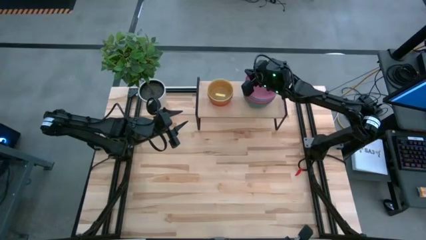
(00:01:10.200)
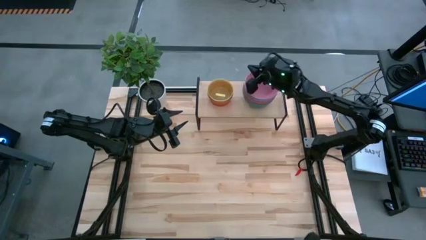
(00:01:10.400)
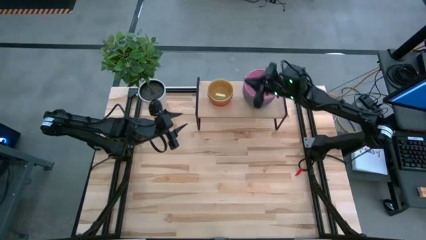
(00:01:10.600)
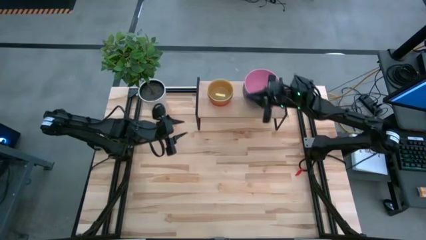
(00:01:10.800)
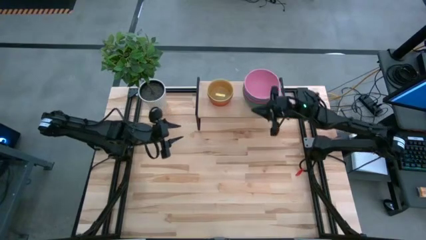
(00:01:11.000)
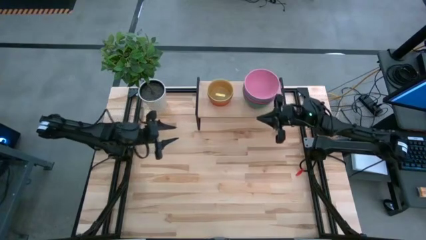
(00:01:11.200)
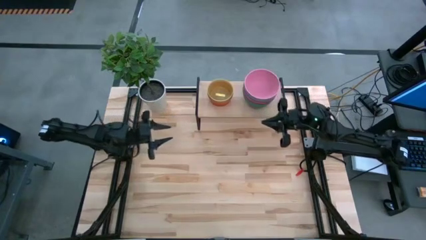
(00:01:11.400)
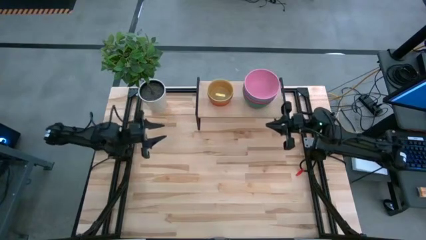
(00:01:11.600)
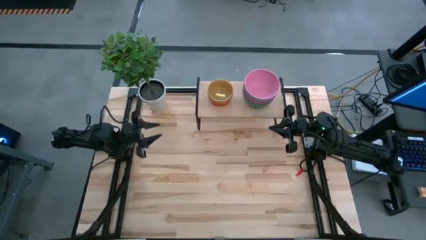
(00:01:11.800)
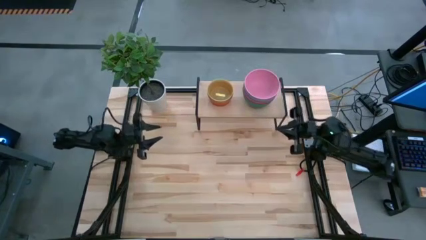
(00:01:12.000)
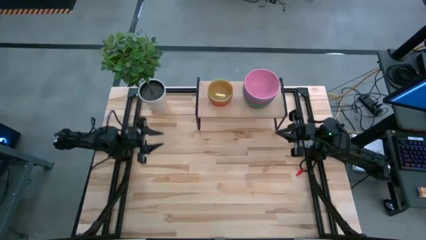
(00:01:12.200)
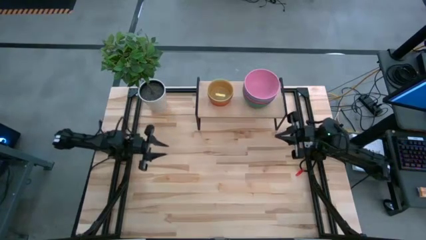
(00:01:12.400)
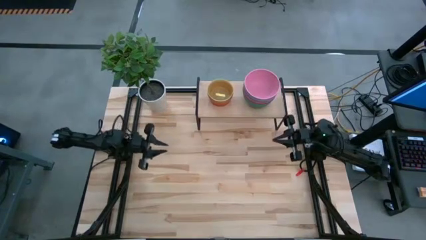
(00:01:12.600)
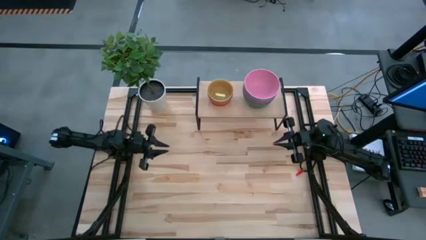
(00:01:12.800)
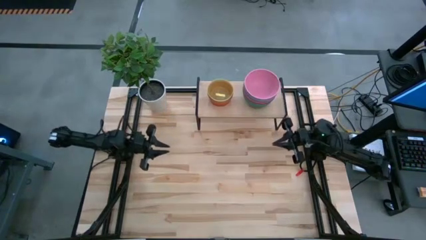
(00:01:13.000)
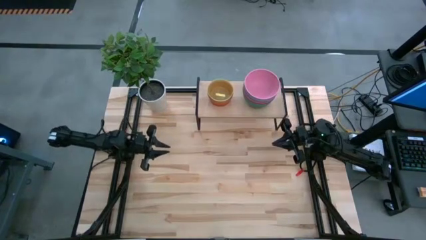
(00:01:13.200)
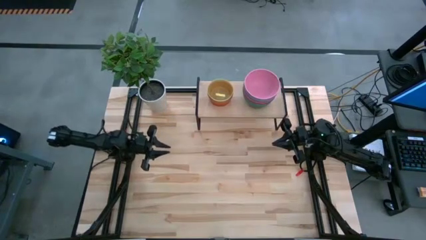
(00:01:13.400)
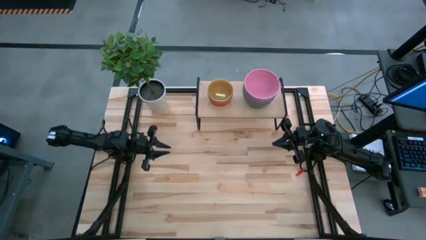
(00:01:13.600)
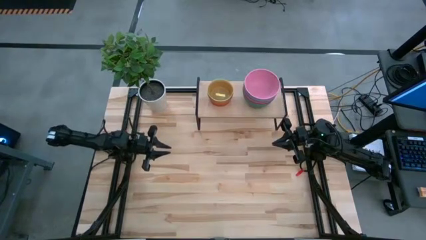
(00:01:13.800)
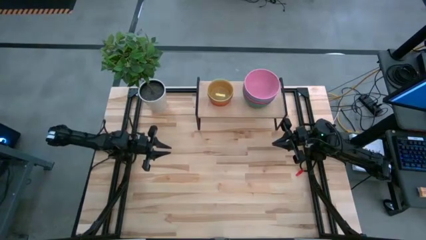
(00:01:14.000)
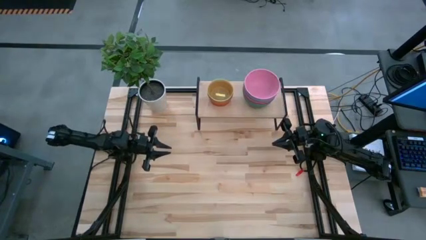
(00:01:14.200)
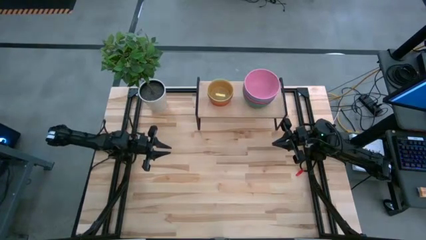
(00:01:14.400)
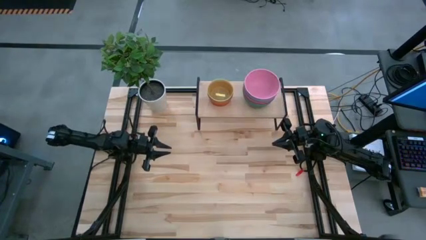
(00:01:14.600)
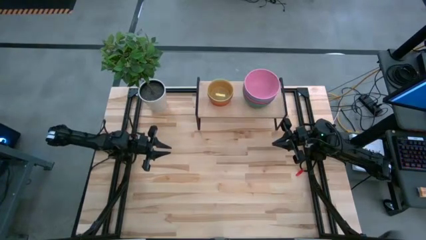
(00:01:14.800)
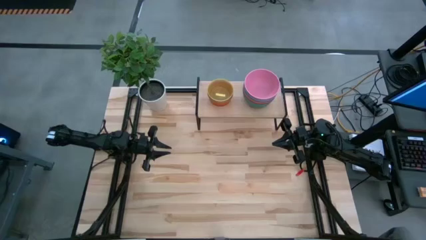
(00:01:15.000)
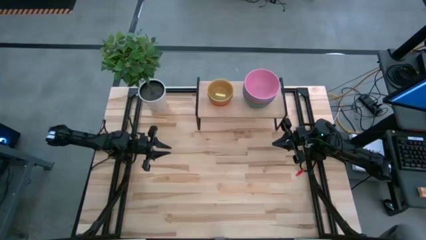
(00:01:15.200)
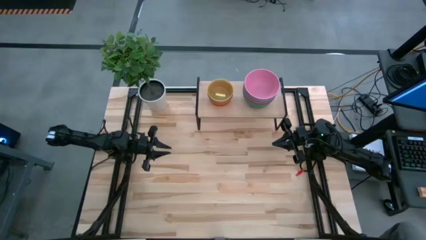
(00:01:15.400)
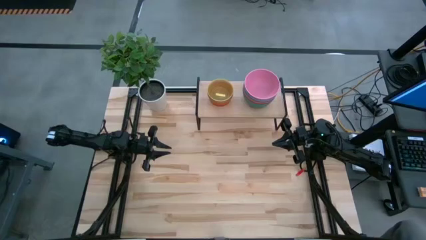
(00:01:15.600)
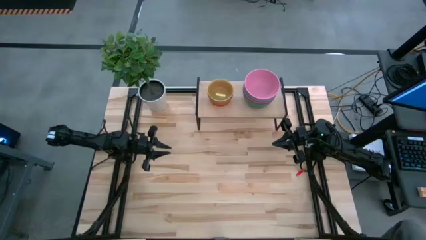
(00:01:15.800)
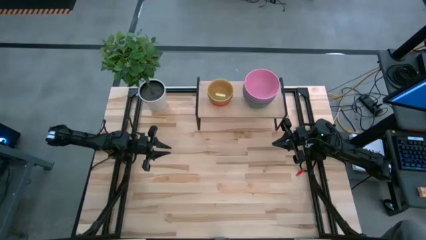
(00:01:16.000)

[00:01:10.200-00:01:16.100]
Task: Place and stack bowls onto a shelf
Return to Home Position

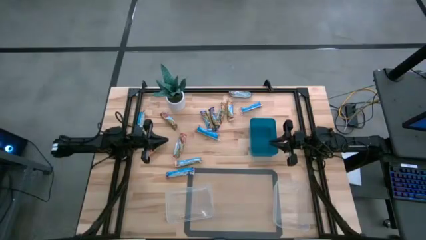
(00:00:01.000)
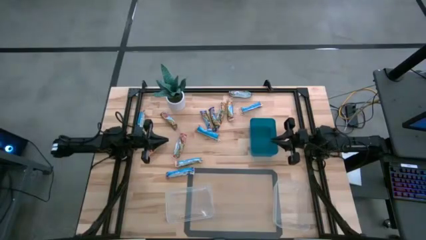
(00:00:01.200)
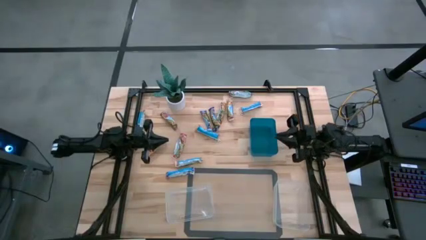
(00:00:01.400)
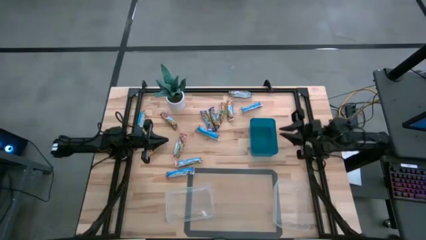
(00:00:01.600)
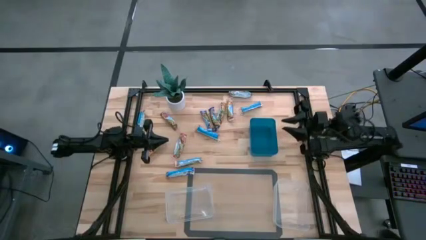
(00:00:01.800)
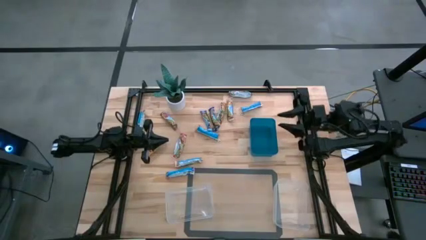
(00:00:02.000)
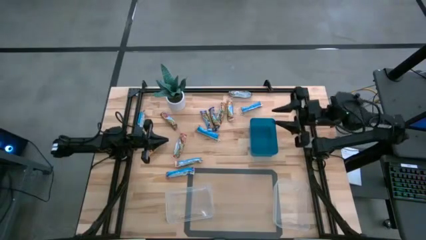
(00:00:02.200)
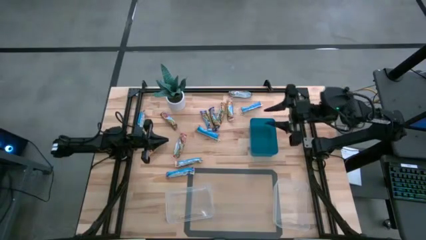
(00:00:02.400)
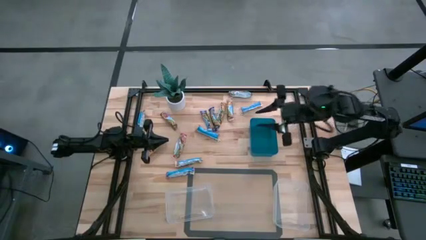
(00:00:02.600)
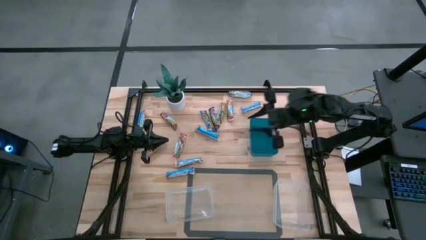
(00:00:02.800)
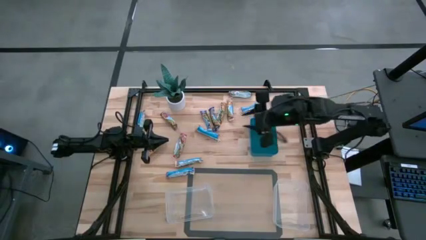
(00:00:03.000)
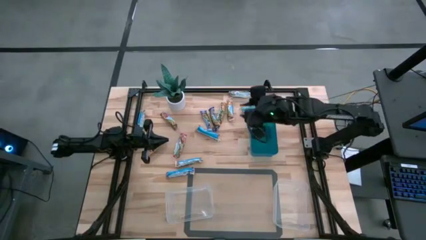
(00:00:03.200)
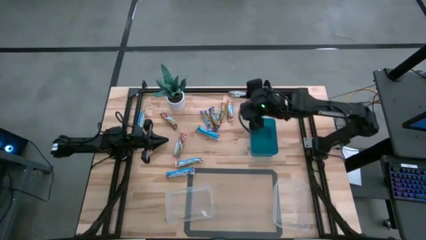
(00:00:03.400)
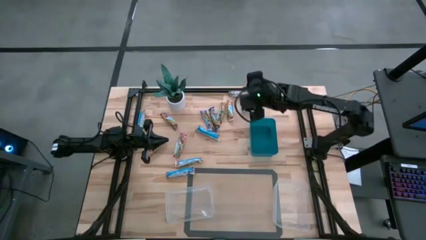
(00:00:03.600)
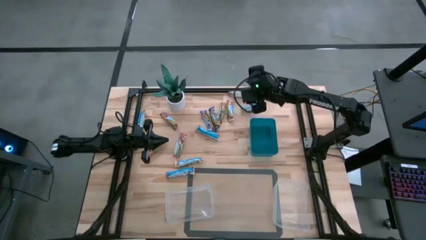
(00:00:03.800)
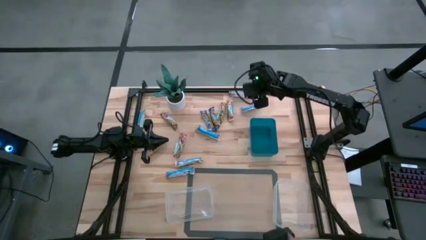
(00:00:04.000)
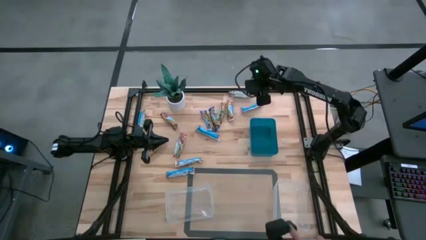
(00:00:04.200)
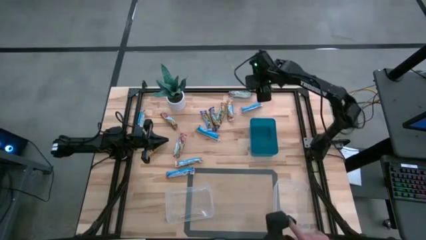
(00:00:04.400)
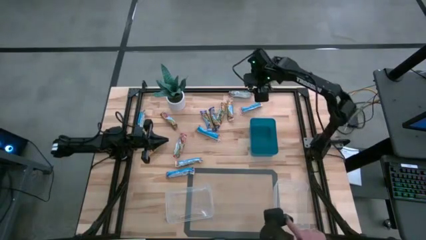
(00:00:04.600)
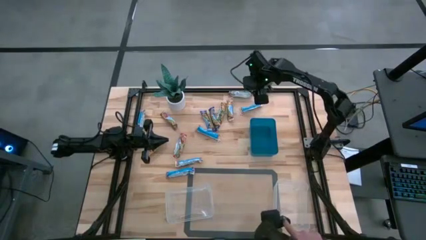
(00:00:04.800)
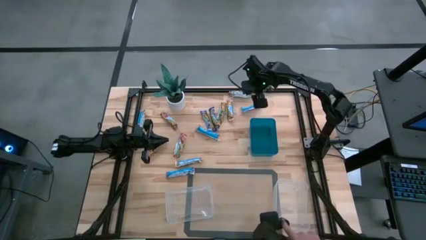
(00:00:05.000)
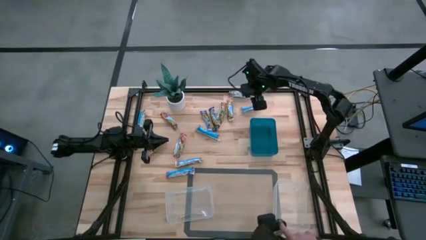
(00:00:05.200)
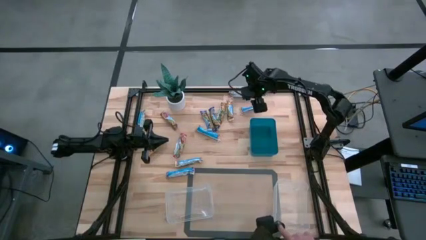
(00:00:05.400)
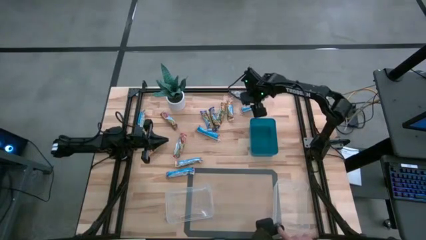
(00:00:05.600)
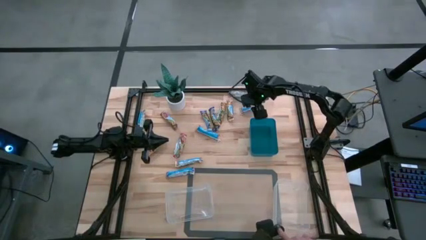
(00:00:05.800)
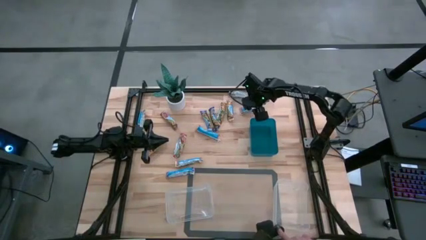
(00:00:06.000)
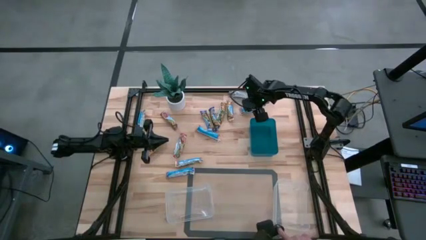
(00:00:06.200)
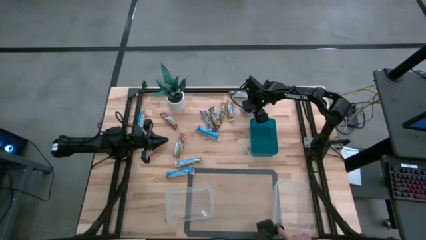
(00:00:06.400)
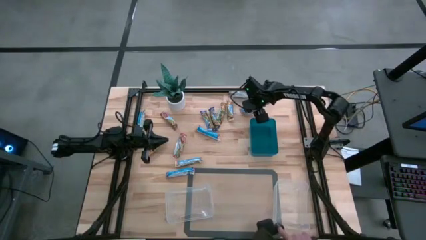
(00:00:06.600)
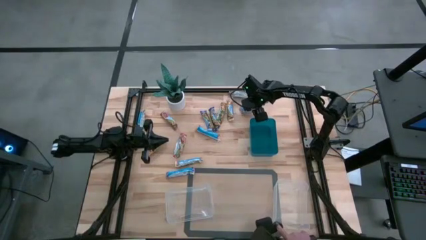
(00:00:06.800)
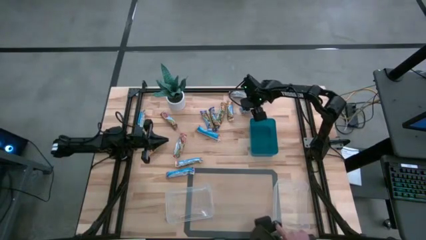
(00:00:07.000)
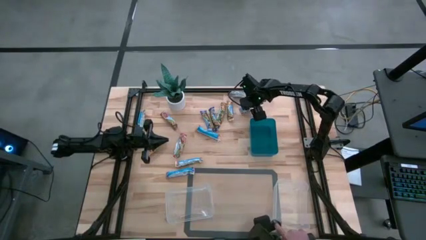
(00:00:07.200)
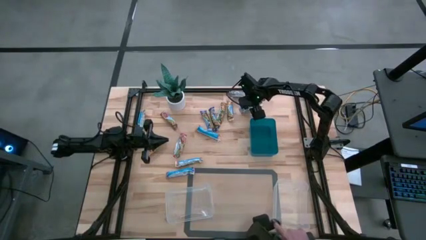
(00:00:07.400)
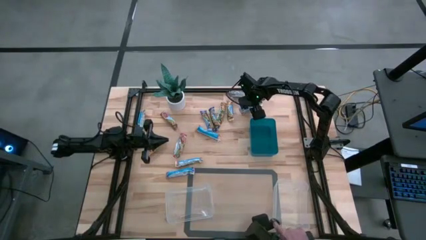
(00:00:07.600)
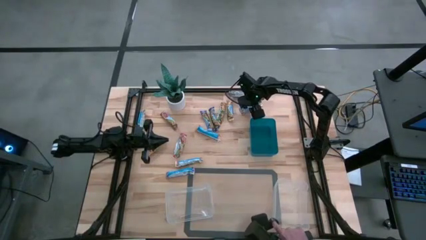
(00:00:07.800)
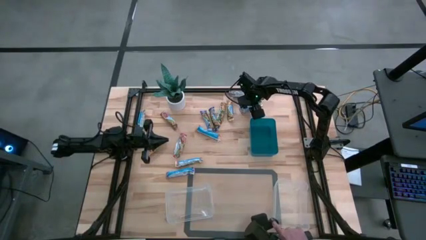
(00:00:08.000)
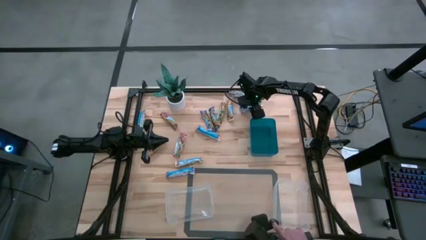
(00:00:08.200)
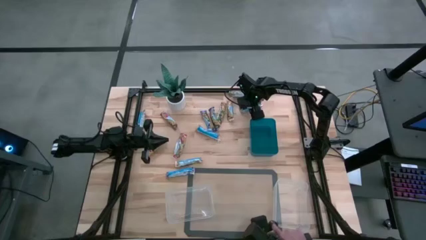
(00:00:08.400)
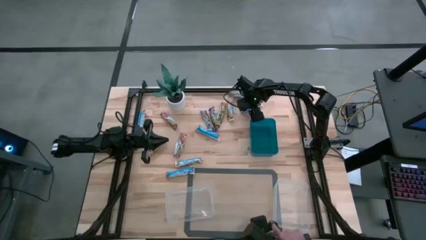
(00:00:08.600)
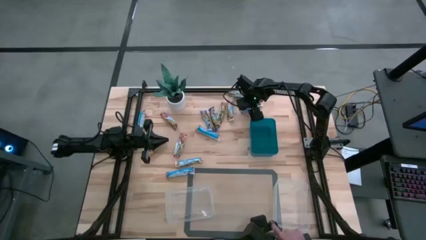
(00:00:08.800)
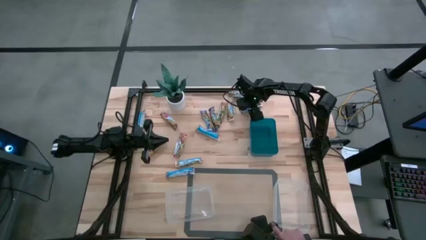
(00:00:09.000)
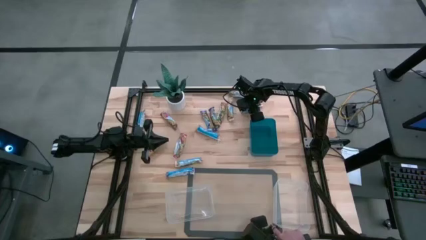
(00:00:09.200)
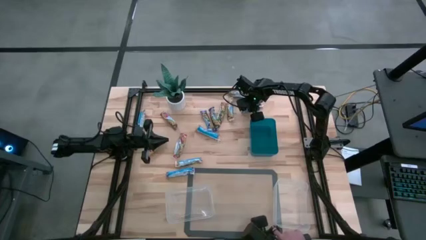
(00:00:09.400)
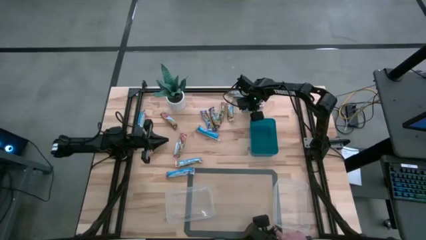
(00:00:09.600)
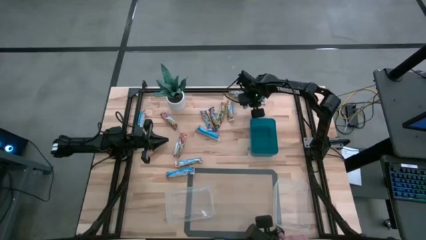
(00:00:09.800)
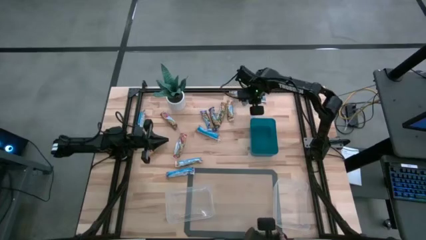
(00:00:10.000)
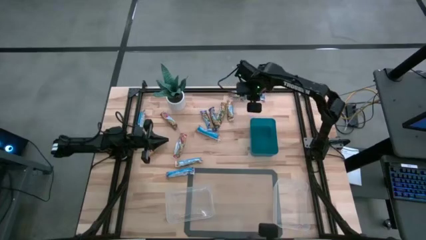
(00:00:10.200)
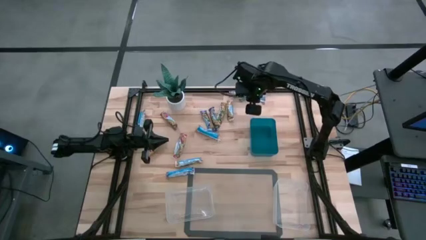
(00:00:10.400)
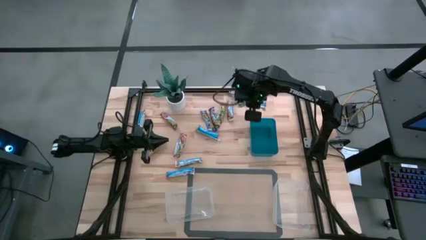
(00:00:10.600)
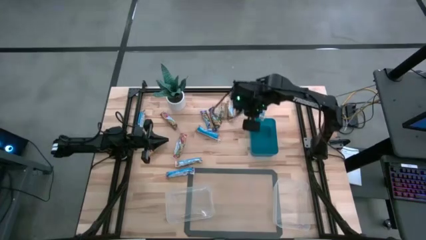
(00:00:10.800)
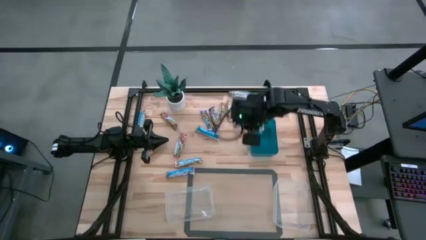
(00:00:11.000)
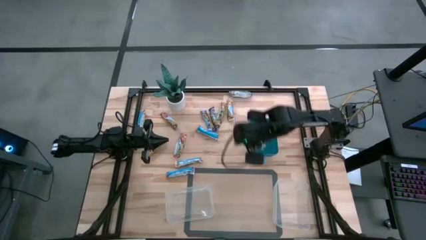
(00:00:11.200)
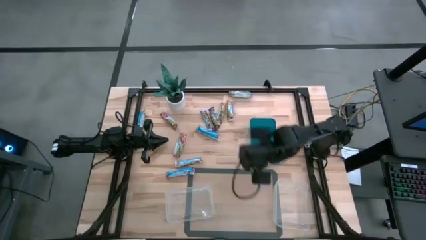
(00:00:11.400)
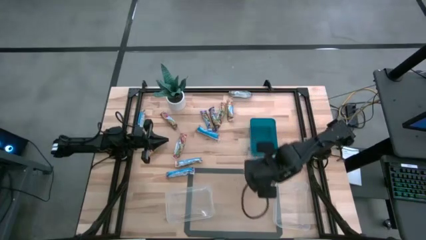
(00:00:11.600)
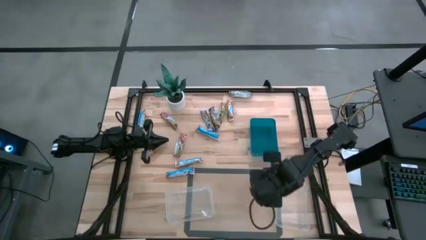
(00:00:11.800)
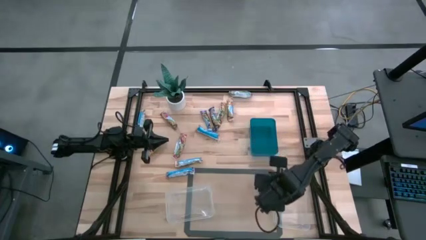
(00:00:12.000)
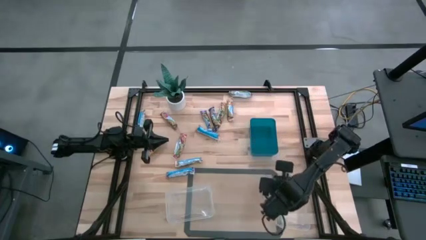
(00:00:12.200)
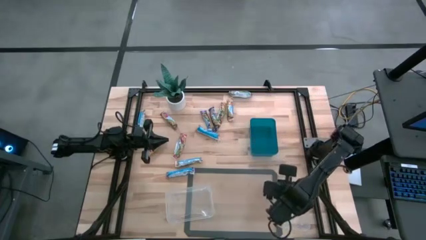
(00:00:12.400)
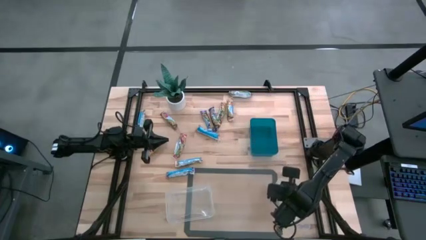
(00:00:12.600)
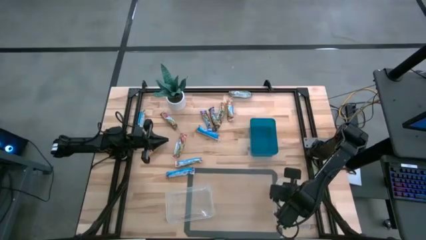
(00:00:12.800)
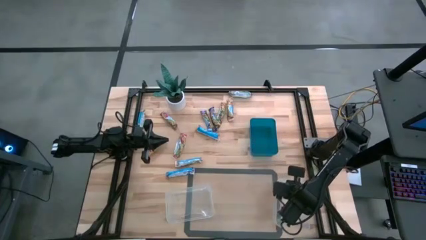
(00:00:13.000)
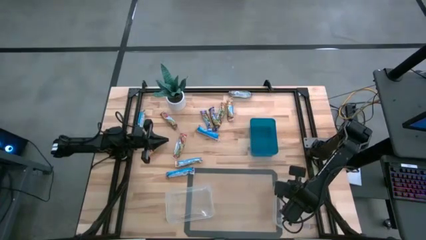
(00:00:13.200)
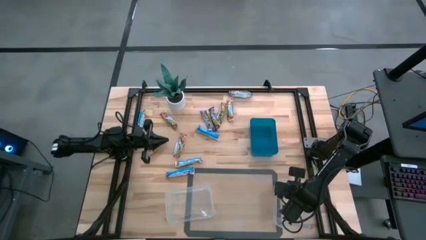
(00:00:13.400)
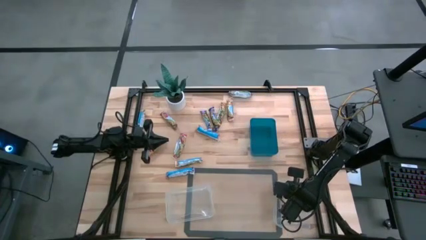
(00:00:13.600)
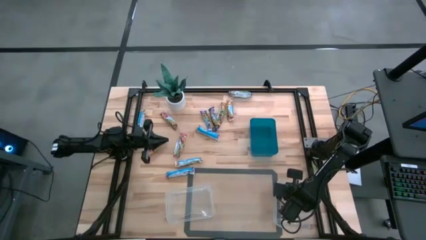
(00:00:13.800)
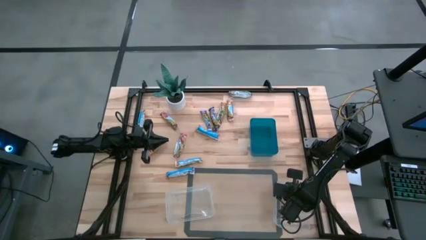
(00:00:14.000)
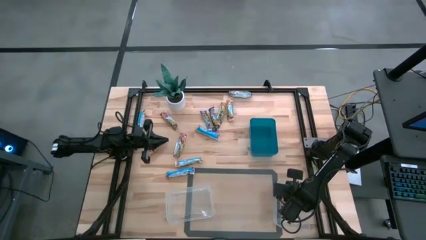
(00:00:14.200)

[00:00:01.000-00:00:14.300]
Task: Pick and place Granola Bars by type
Put the yellow granola bar into the right transparent bin
